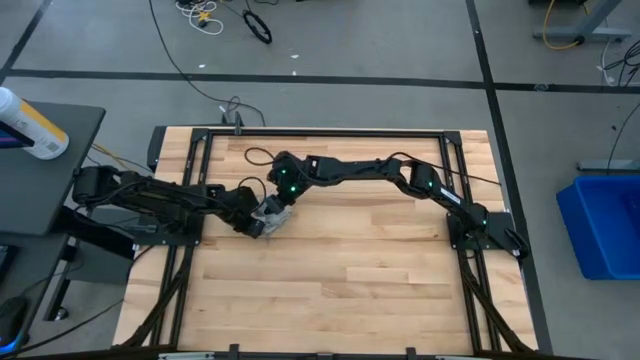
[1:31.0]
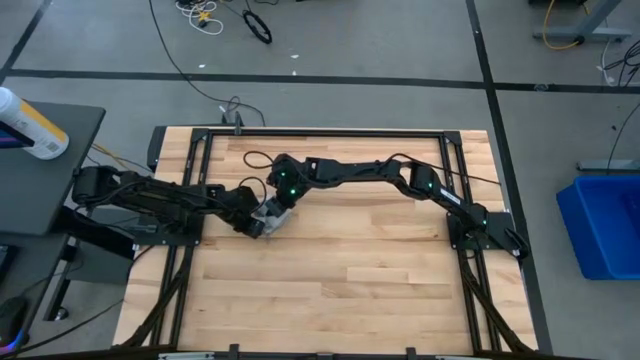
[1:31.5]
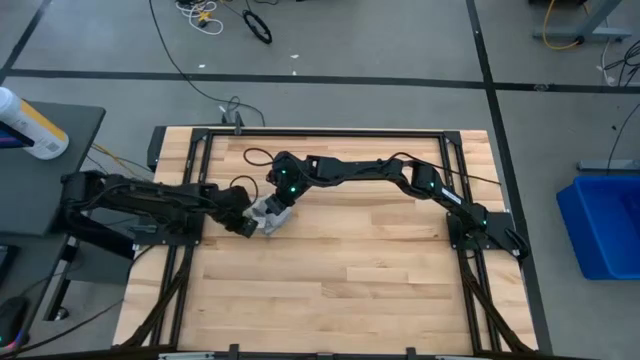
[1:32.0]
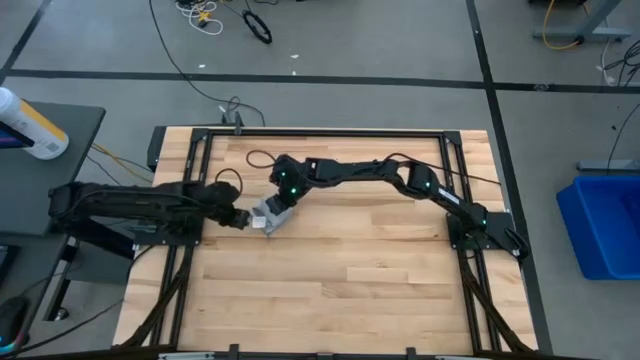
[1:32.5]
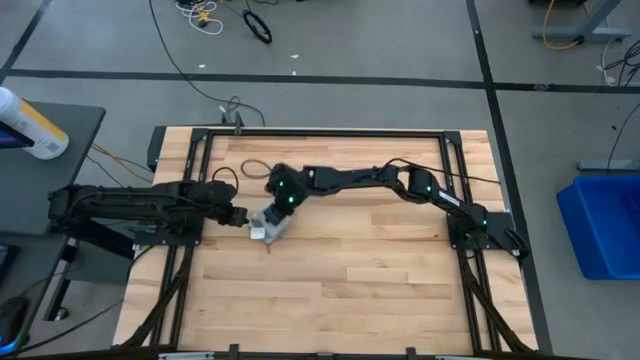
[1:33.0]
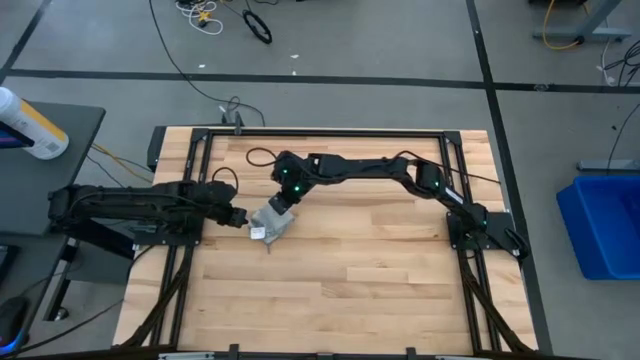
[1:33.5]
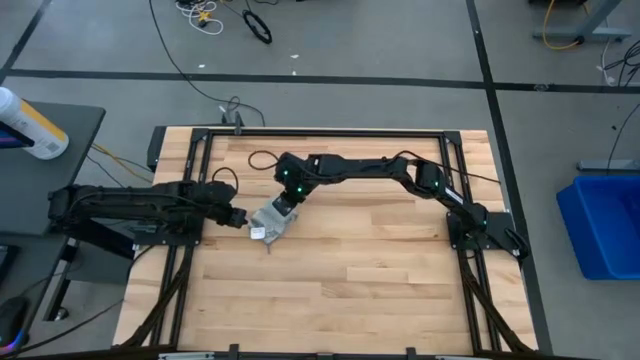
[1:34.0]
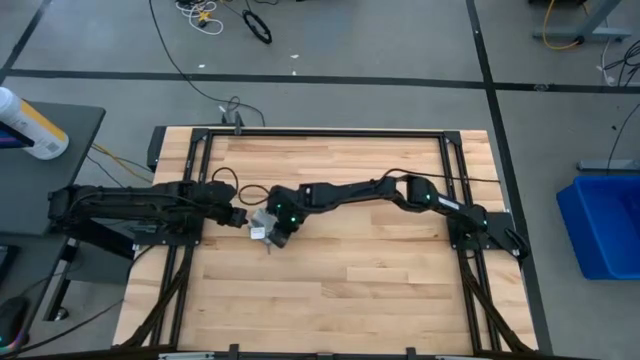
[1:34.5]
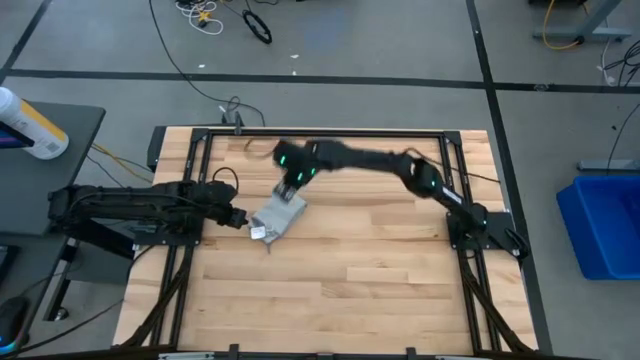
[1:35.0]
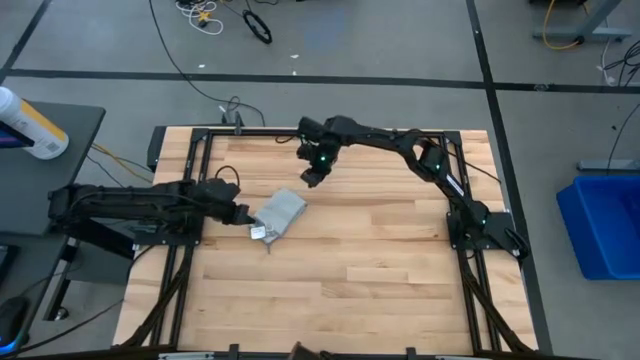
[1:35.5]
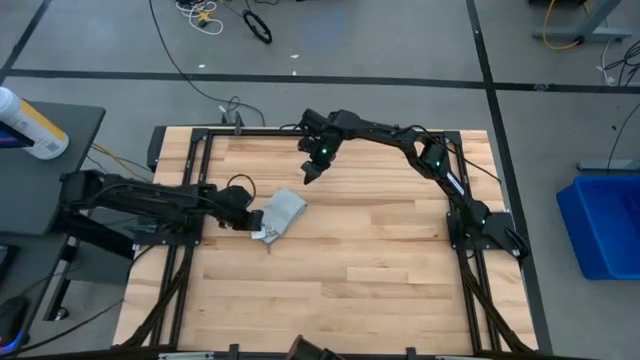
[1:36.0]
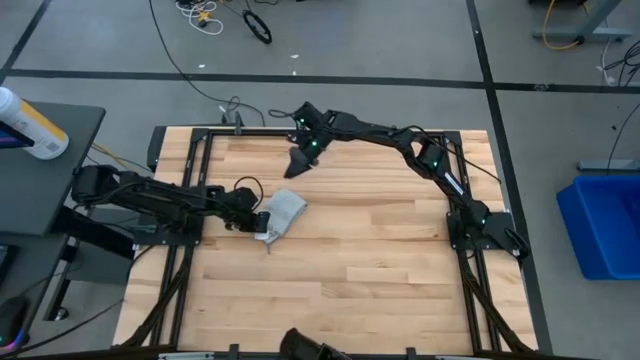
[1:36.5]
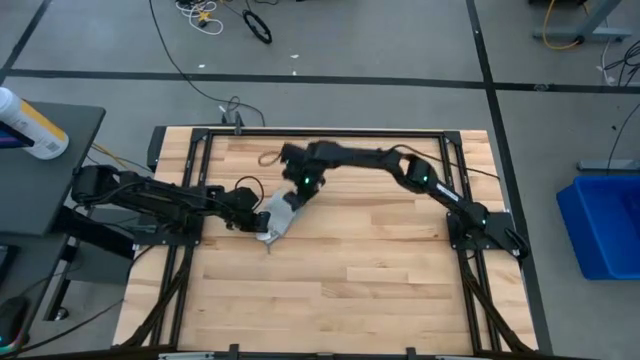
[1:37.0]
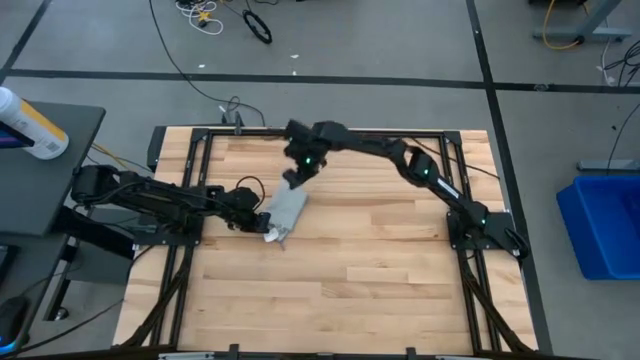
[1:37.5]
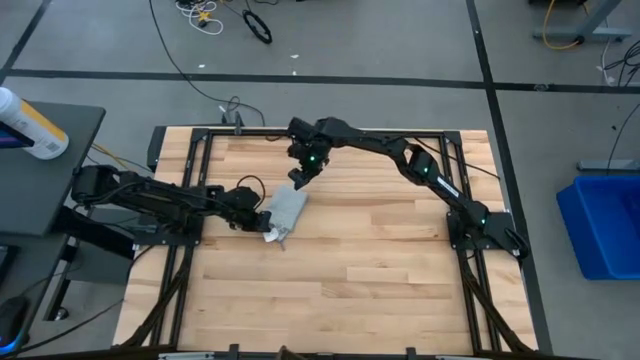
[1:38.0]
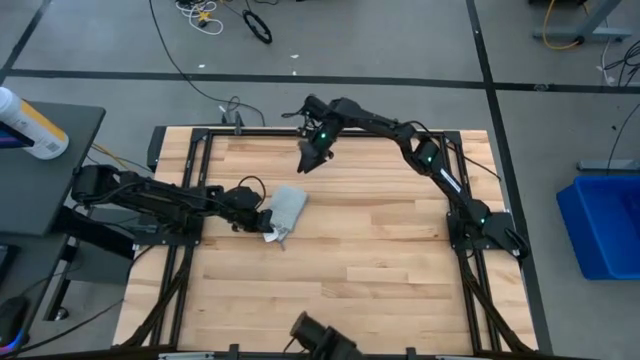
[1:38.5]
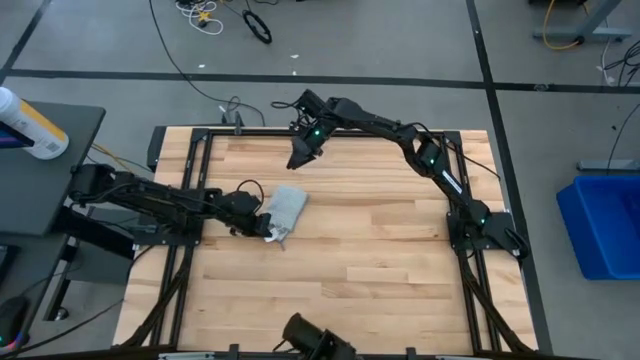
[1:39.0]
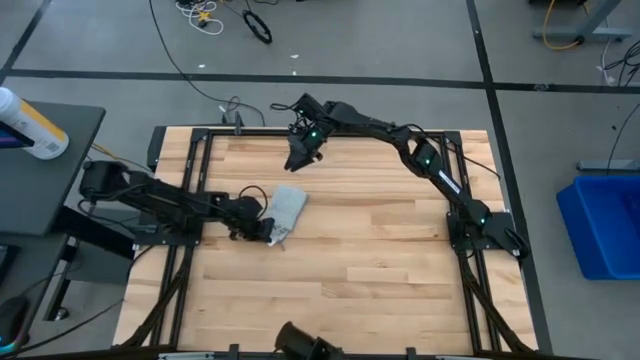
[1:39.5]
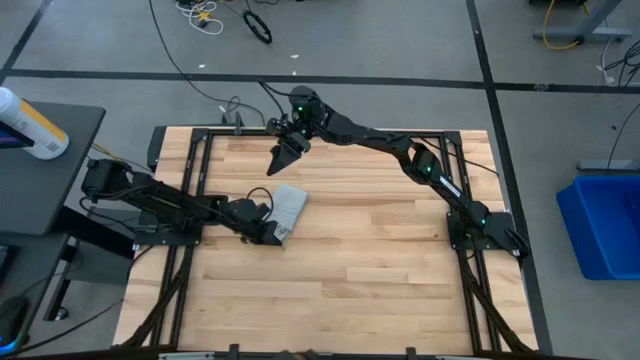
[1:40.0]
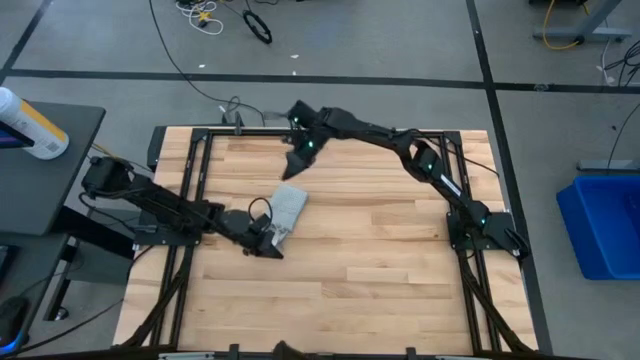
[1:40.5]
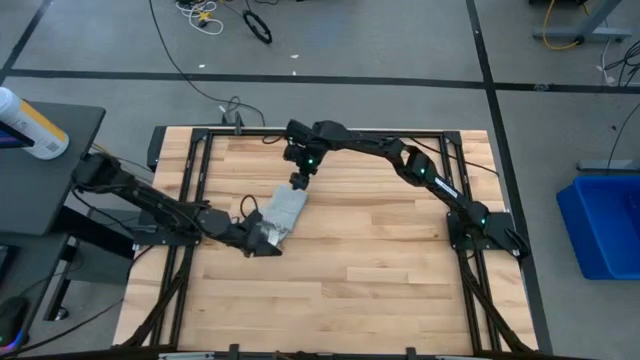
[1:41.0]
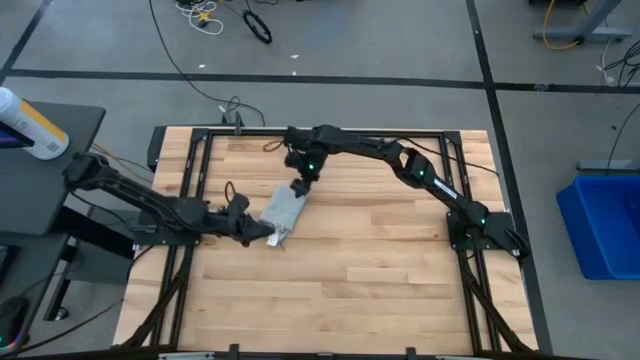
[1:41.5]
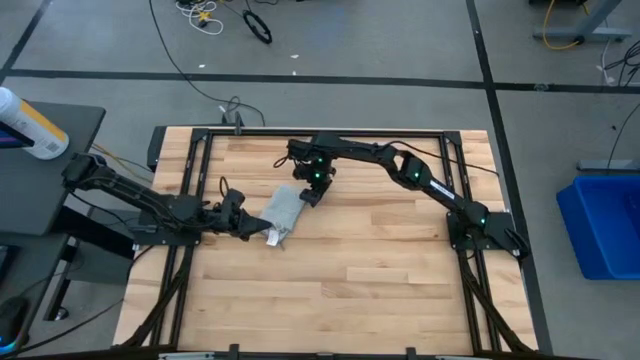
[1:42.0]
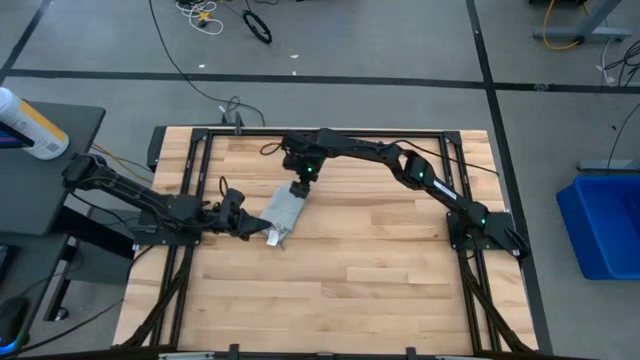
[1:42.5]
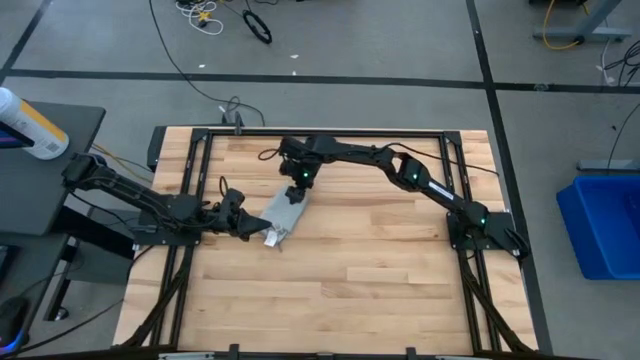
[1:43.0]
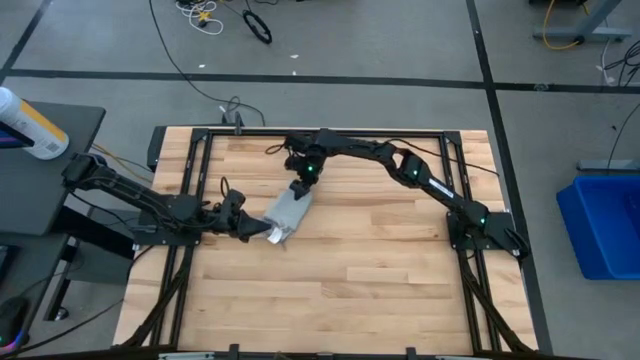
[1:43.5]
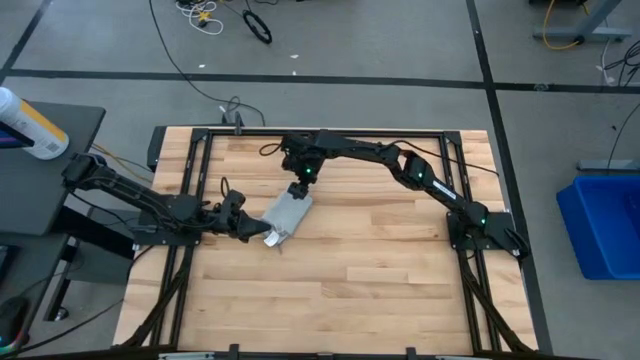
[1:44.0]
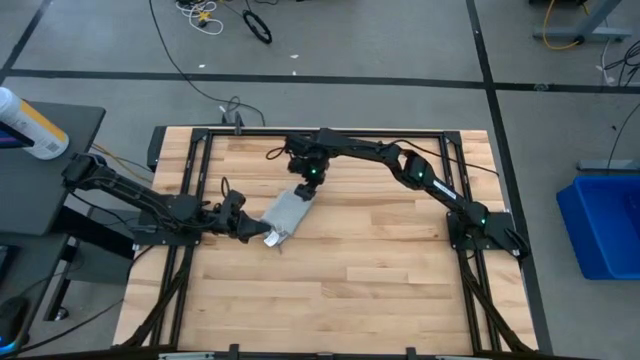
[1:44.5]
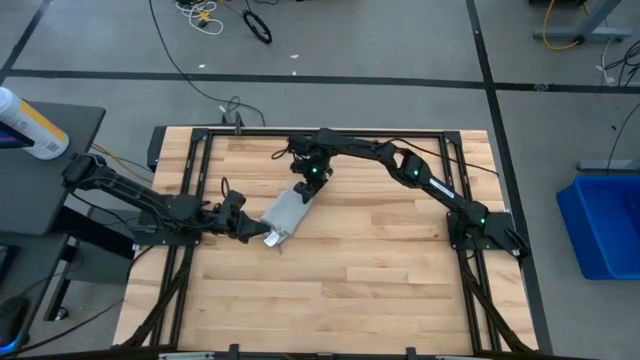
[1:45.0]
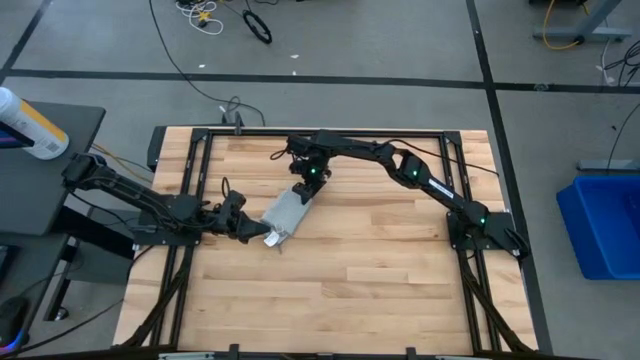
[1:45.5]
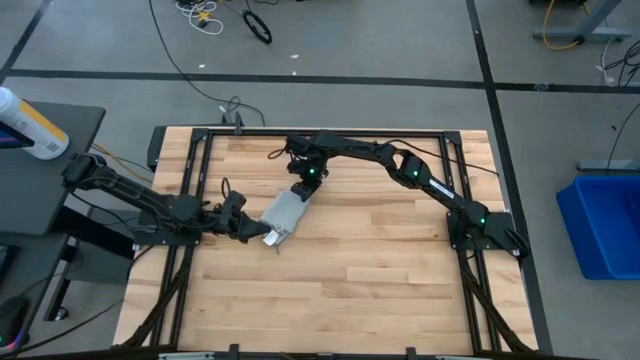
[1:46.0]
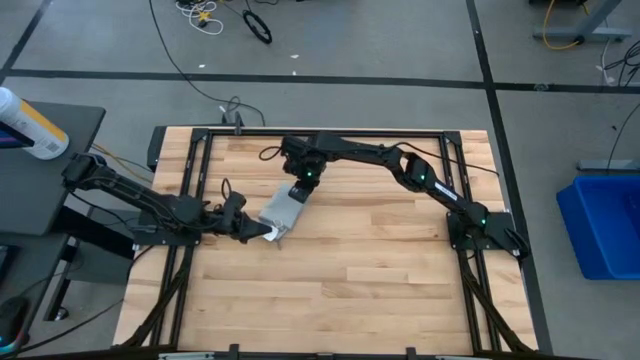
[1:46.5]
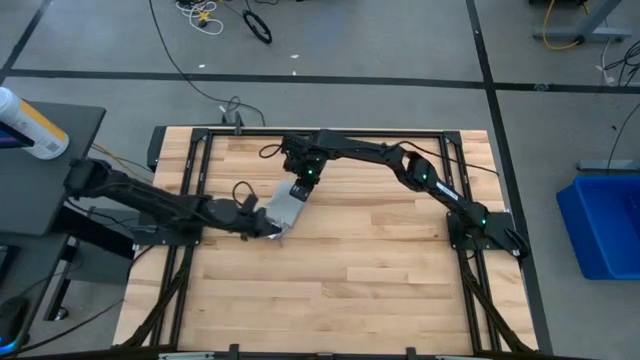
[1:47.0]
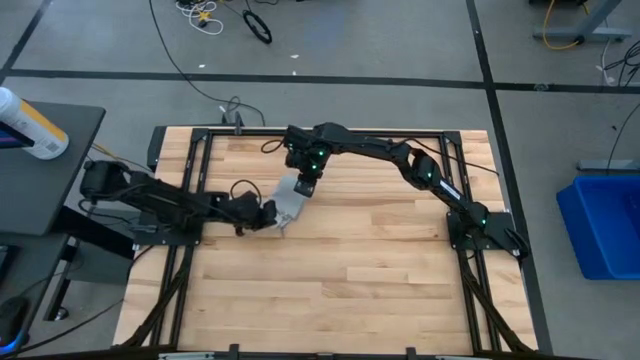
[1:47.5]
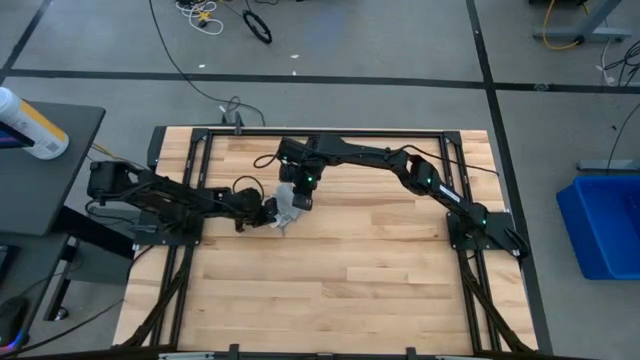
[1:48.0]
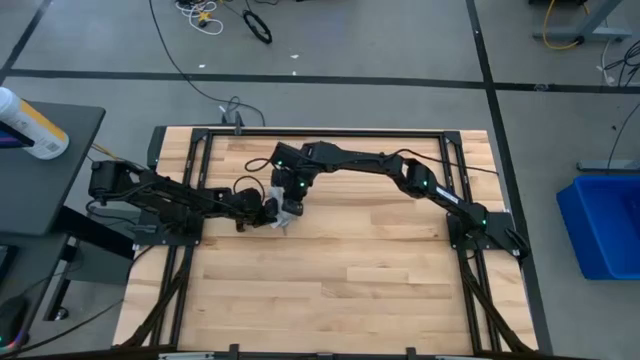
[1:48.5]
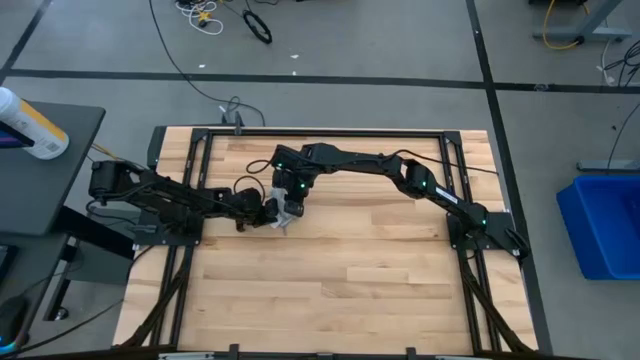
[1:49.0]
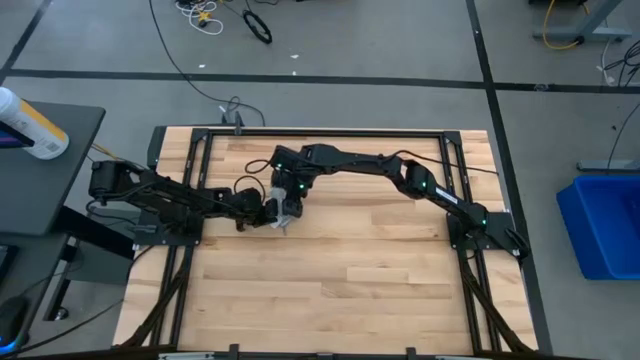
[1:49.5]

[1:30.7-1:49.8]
Task: Fold microfiber towels
Fold the gray microfiber towel
